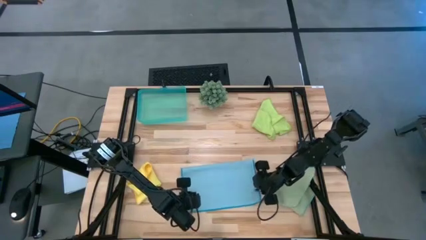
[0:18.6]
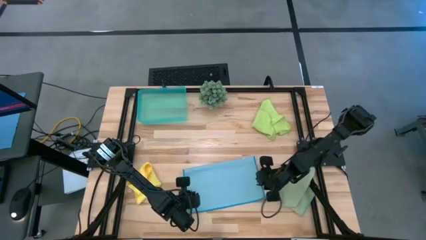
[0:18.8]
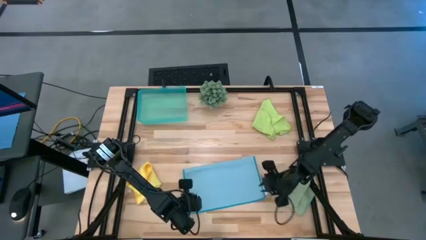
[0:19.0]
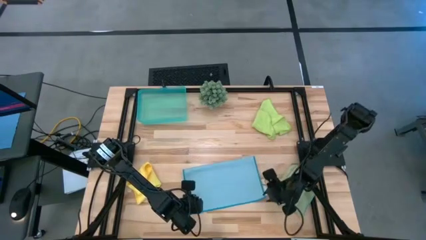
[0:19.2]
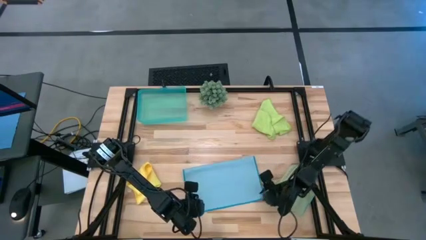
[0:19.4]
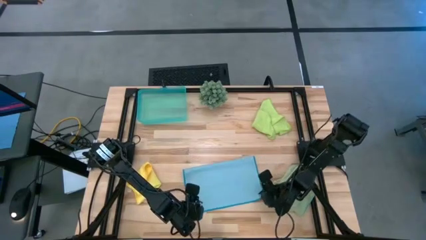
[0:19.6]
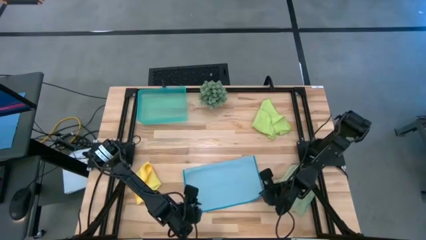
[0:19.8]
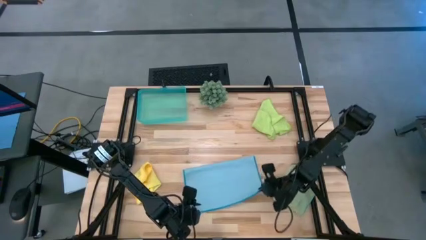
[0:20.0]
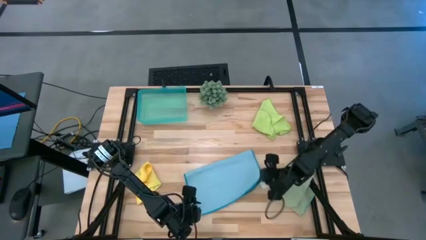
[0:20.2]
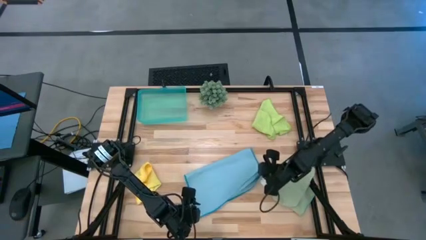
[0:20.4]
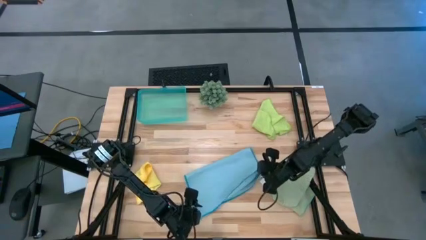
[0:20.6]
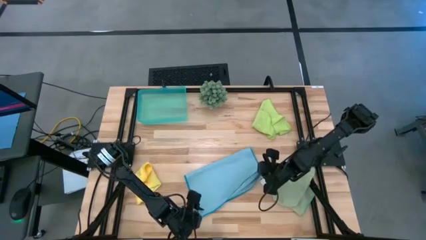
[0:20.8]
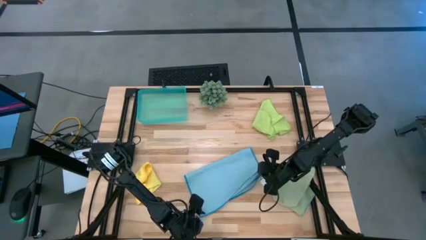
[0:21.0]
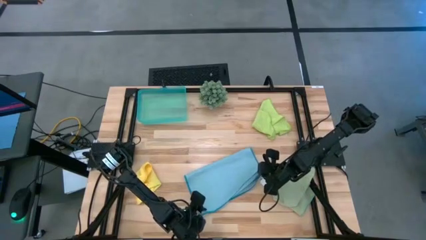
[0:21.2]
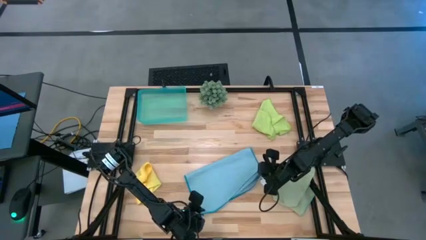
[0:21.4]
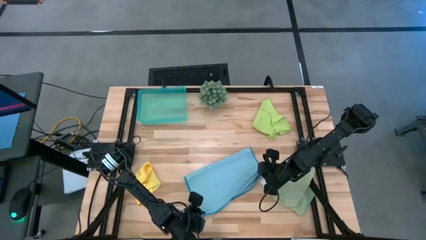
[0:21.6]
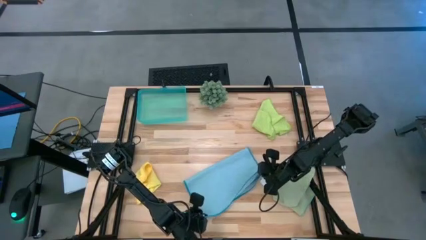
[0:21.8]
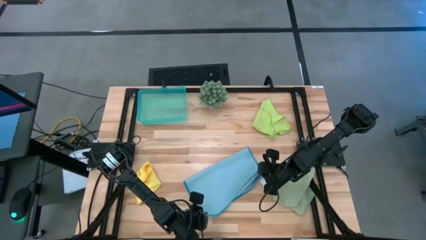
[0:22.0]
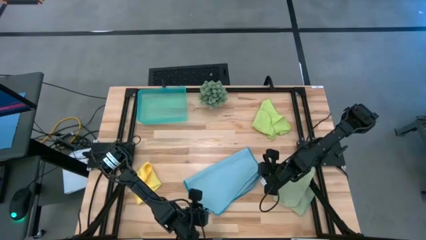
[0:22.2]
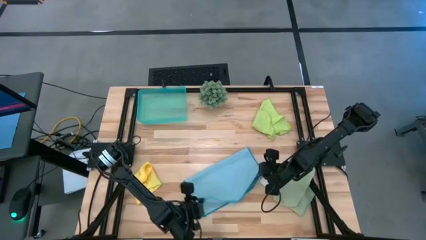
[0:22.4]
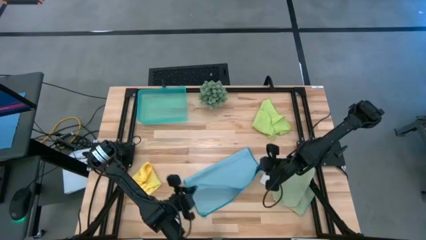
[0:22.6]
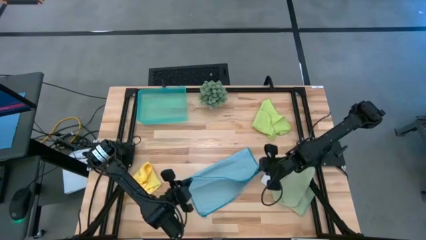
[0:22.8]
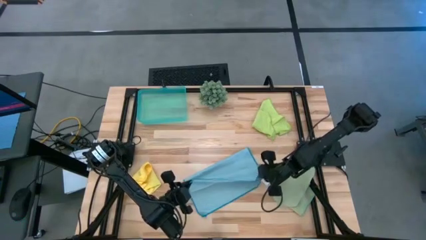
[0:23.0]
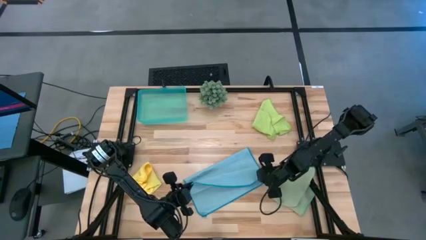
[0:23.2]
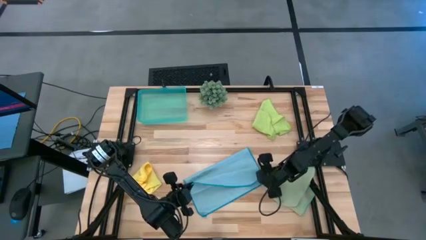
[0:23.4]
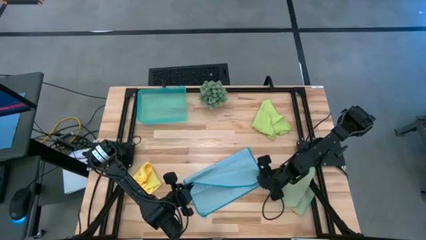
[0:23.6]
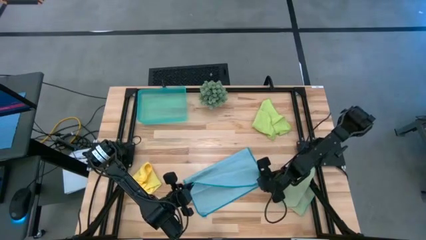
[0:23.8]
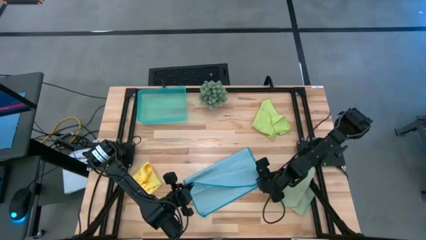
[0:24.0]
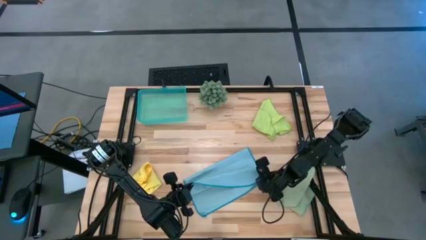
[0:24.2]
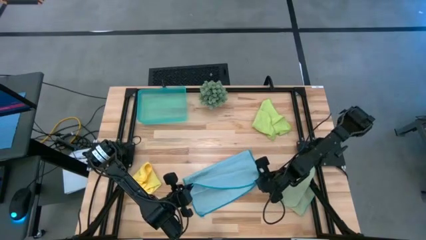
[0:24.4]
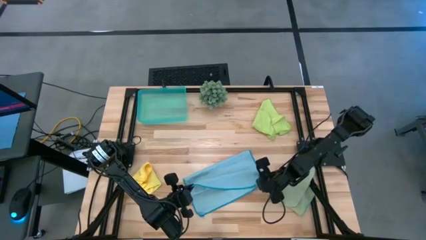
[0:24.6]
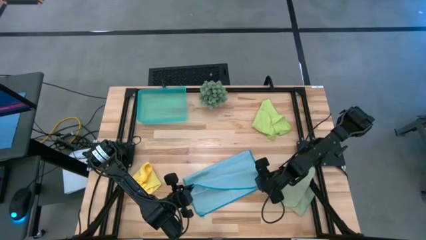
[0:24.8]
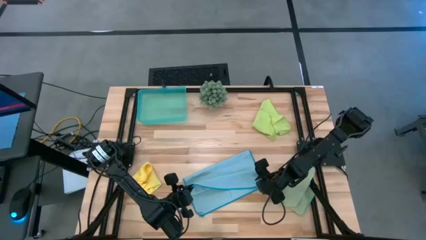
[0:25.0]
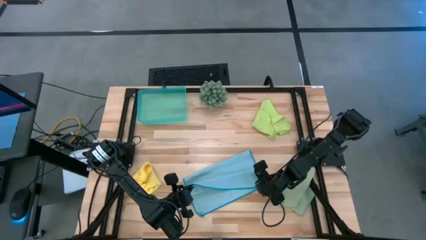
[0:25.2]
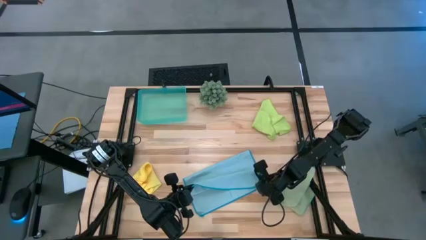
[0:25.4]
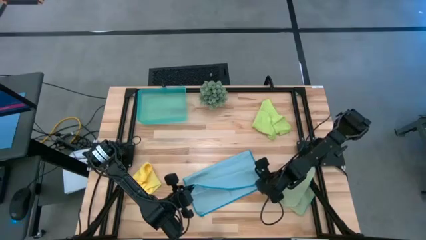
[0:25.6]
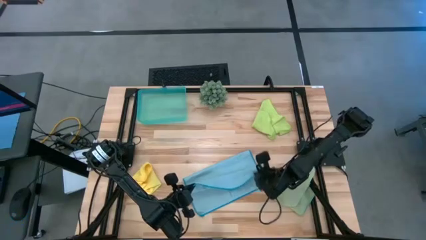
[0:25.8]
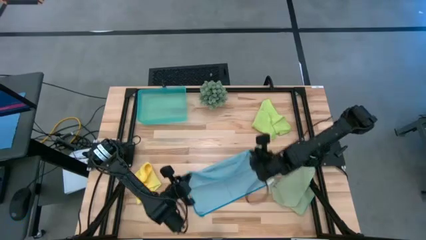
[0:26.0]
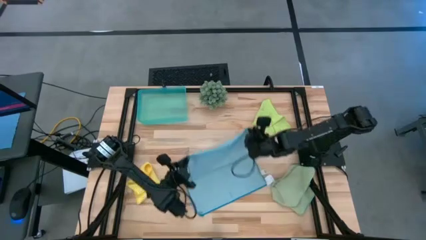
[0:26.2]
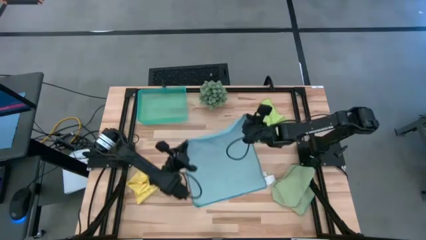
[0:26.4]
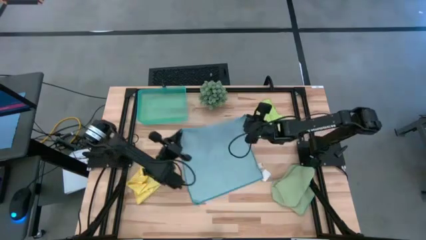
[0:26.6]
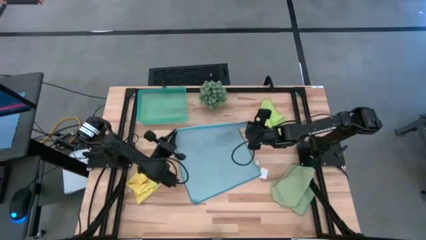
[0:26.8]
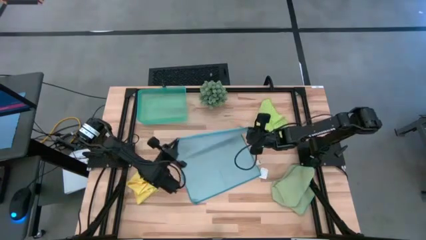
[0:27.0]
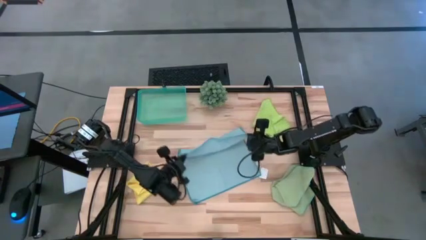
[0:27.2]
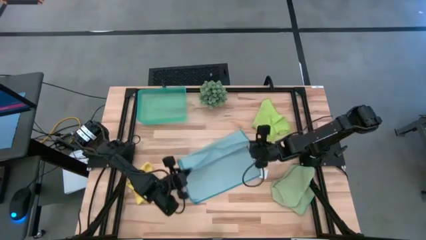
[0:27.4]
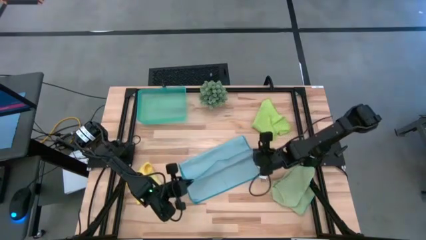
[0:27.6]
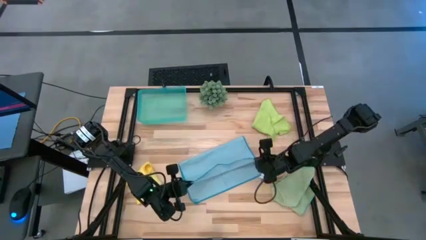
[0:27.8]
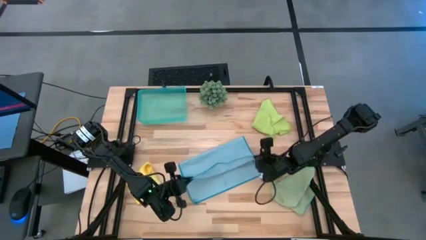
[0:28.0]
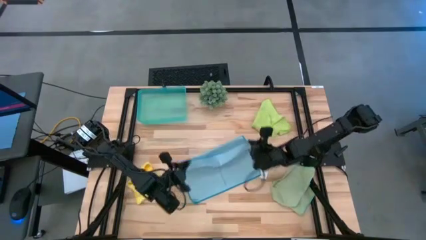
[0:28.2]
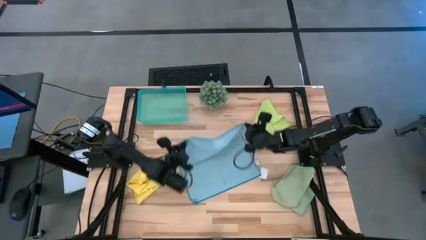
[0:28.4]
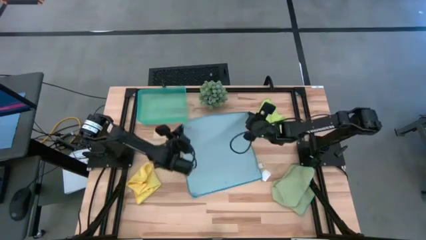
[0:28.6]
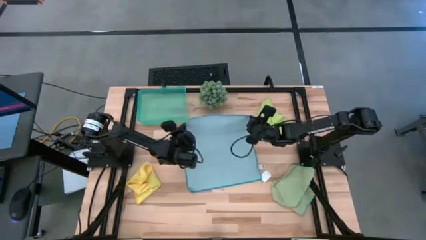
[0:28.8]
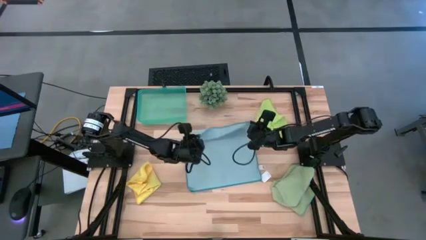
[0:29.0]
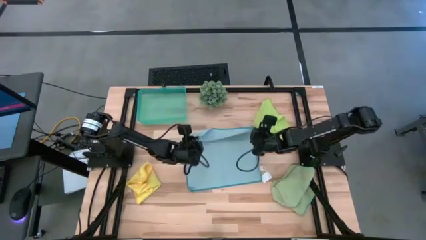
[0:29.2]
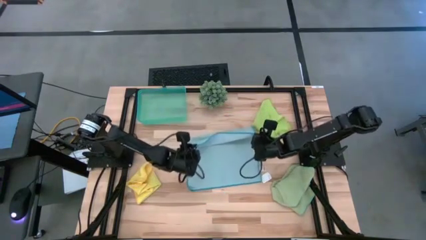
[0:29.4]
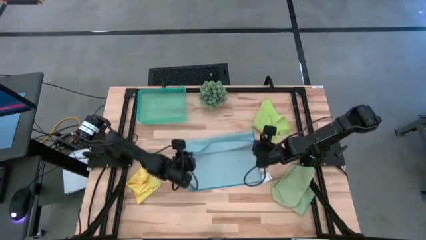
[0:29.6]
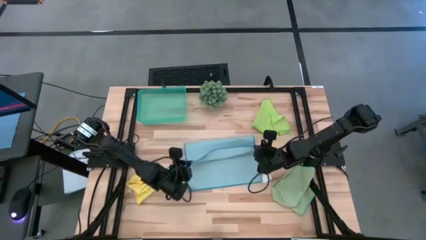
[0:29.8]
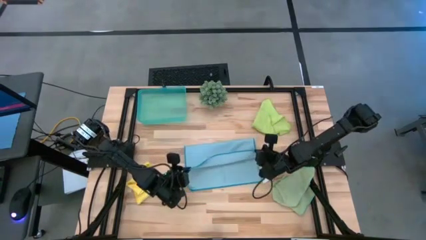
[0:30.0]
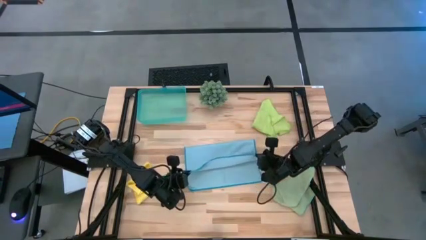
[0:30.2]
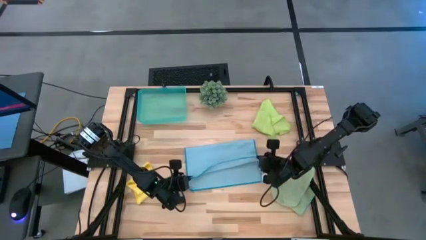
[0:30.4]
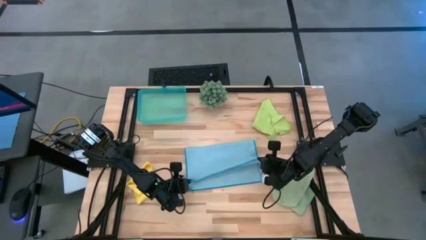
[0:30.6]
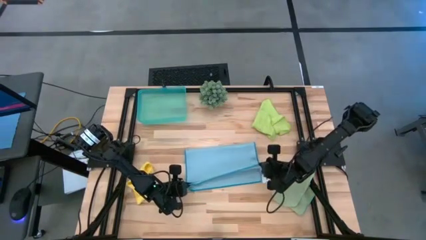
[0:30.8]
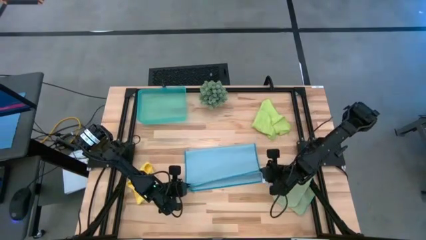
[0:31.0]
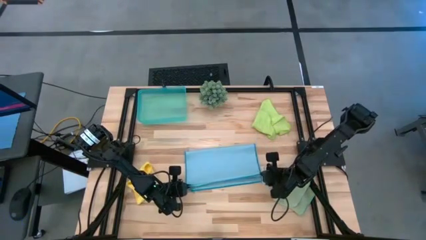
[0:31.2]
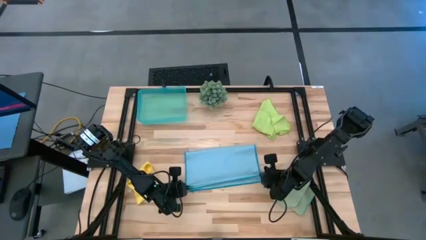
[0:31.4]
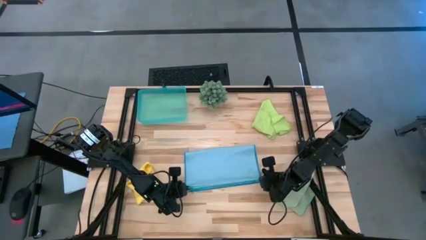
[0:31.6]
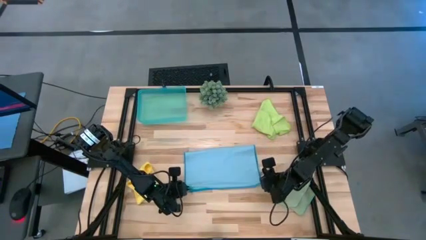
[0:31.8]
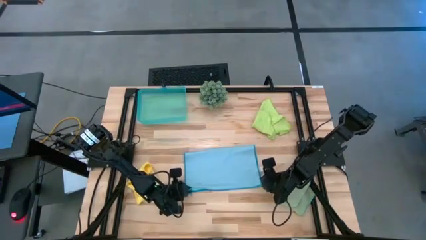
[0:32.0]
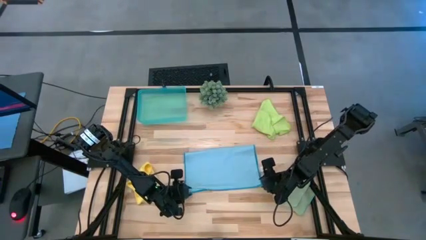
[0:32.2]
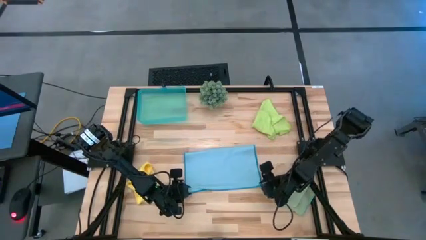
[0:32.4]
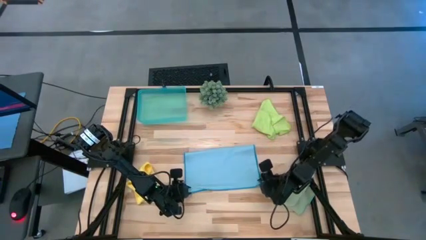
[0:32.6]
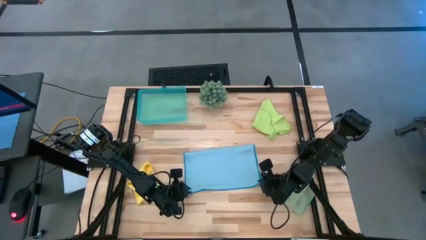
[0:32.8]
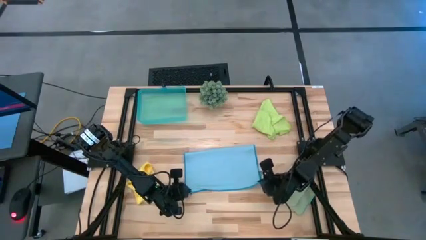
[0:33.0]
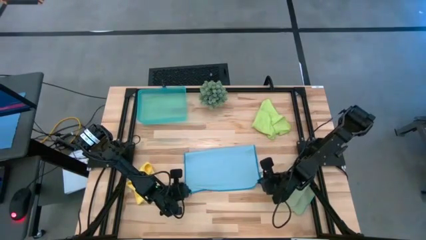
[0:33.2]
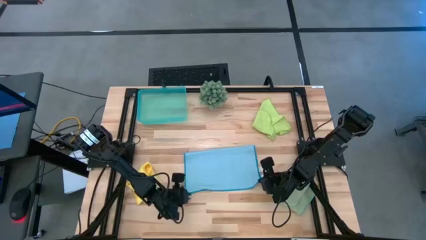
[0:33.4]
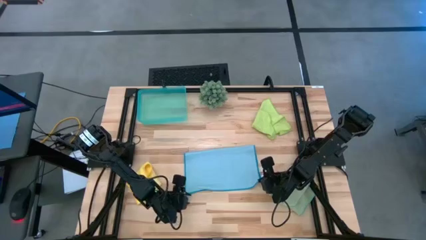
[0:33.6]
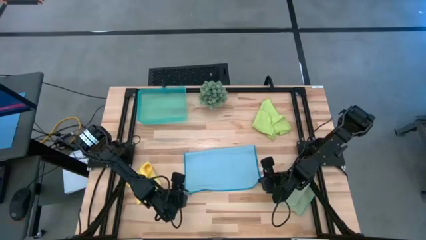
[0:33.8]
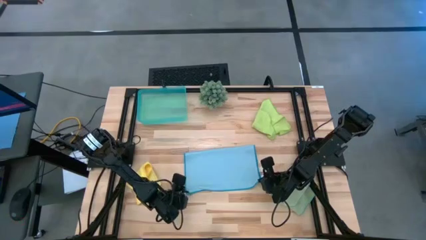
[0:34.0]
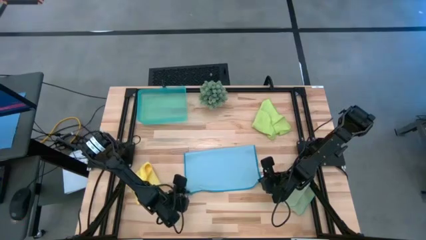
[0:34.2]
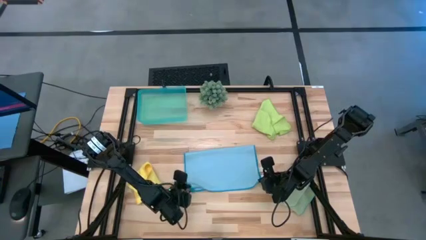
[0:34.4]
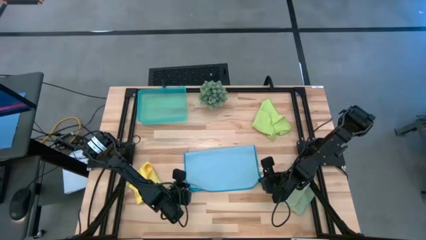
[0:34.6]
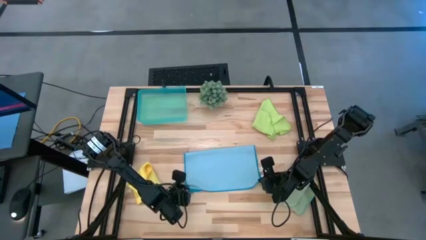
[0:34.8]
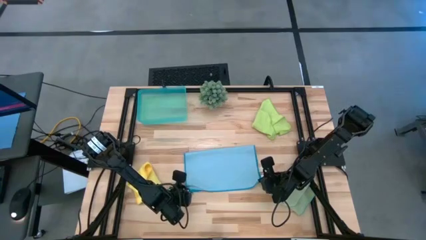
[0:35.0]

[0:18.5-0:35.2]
Task: Fold microfiber towels
Fold the blue microfiber cloth
